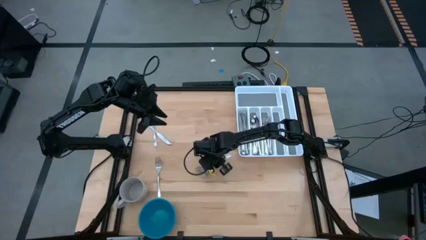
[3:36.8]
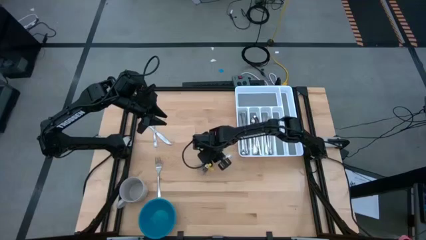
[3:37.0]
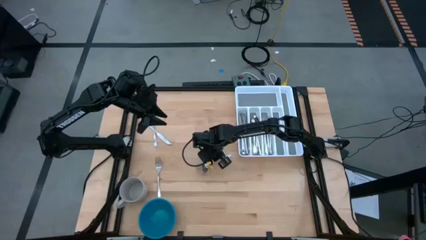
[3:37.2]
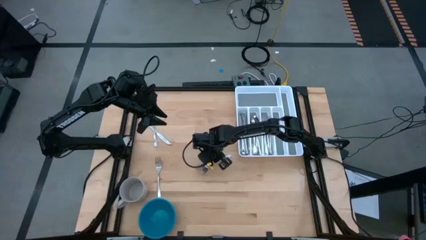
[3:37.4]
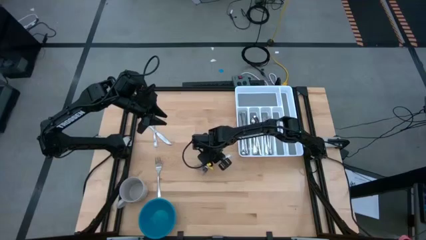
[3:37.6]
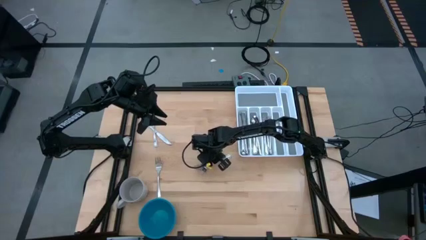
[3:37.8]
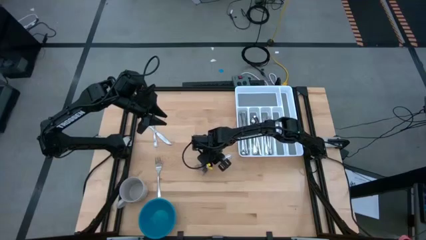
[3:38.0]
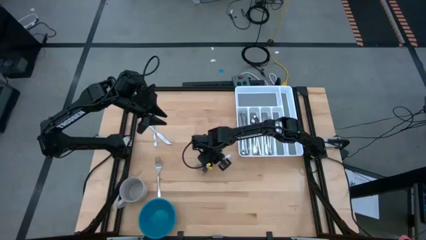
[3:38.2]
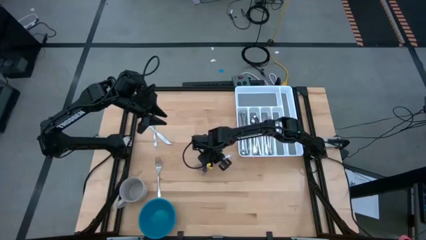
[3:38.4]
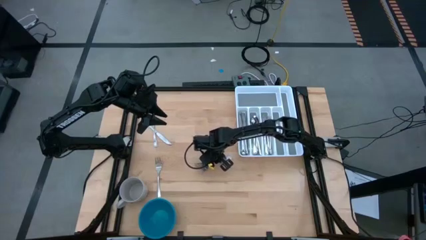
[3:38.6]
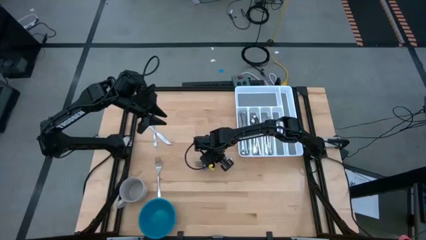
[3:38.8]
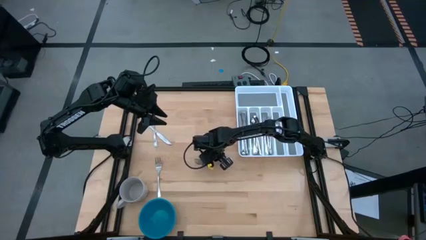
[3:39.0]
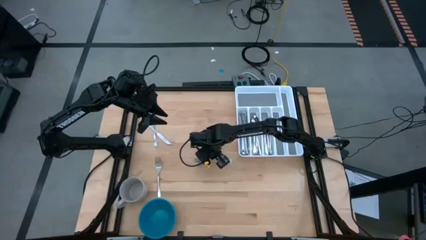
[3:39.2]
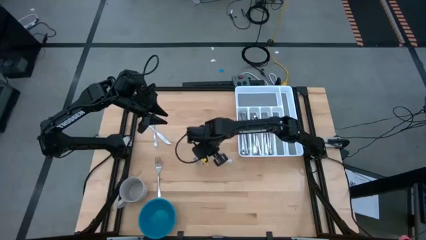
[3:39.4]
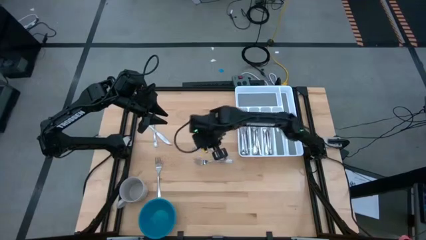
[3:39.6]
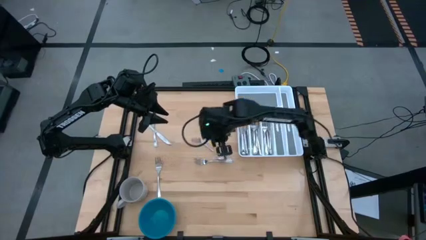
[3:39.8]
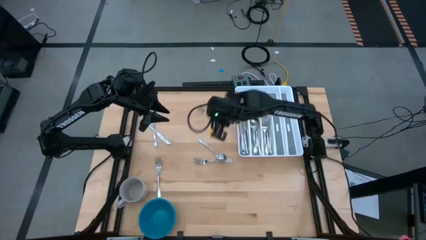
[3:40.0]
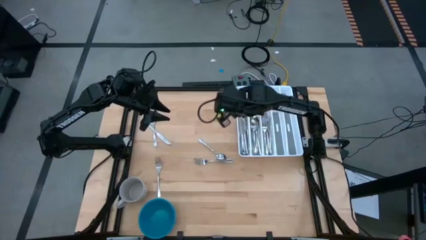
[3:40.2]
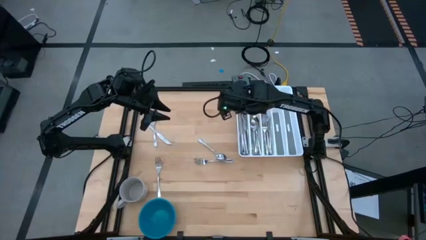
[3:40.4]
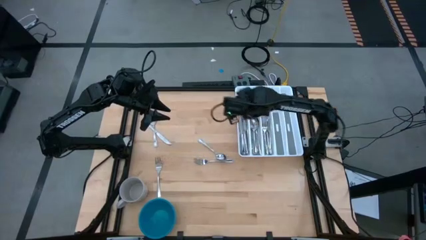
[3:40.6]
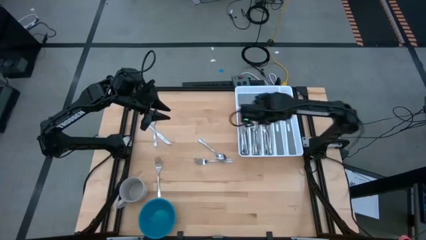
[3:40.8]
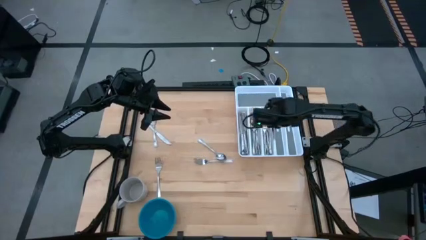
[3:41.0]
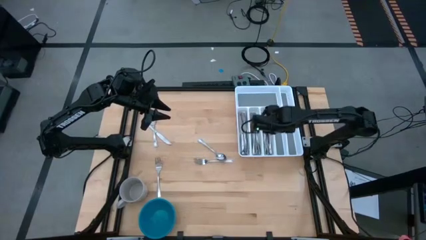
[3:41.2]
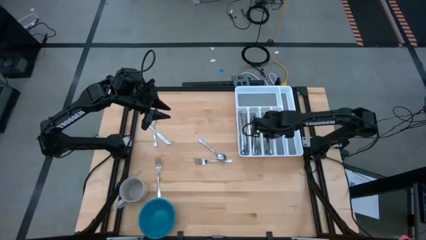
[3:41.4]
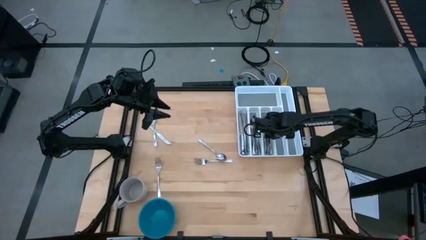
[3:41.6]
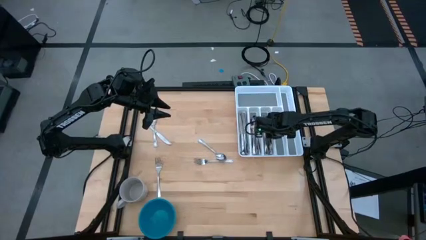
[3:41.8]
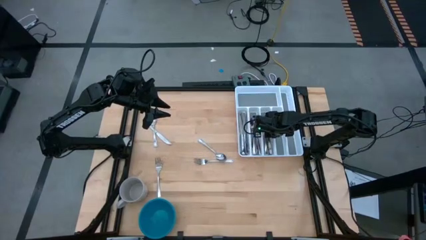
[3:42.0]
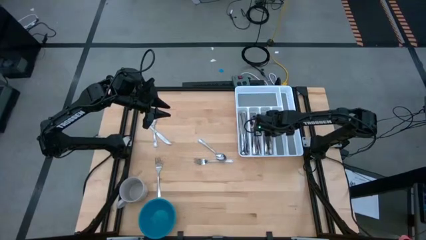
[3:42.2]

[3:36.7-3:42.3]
Task: Sort silverware
Put the fork into the silverware tray

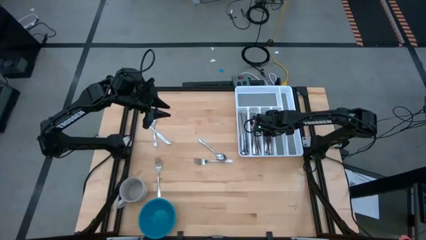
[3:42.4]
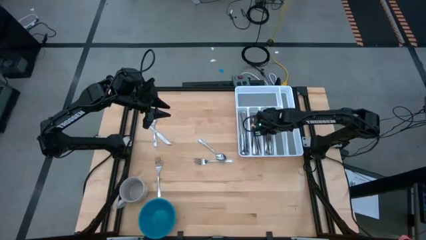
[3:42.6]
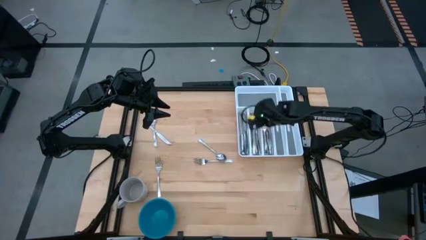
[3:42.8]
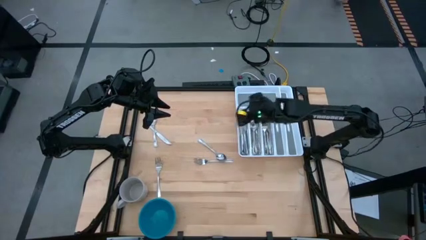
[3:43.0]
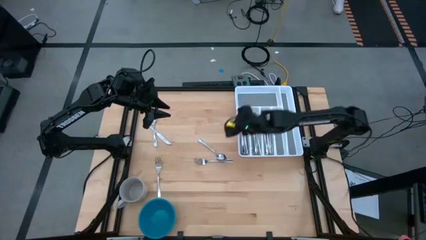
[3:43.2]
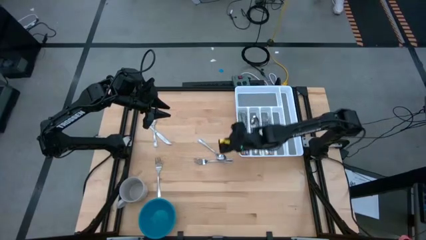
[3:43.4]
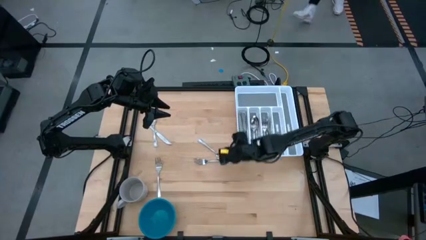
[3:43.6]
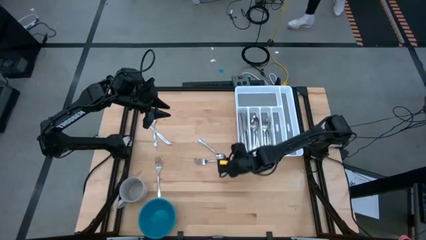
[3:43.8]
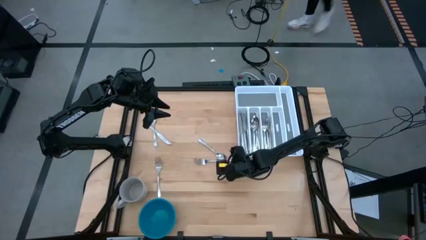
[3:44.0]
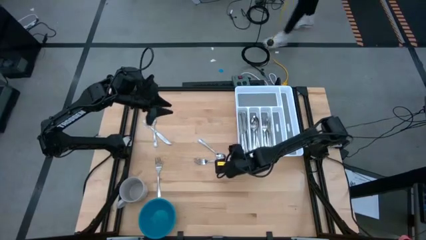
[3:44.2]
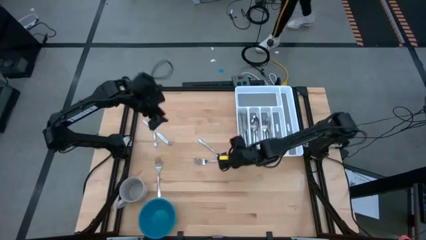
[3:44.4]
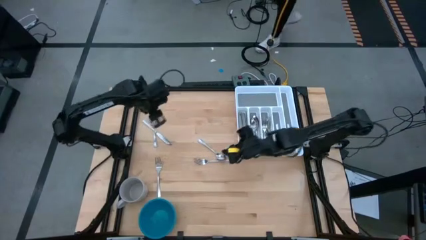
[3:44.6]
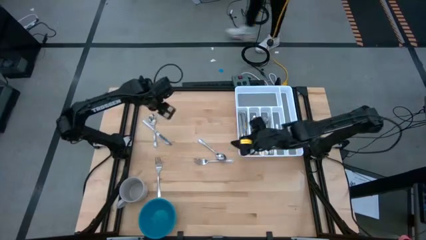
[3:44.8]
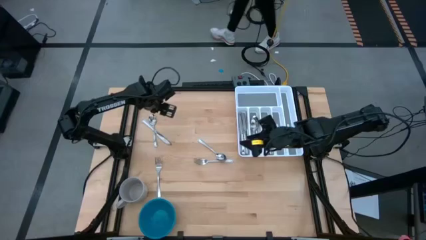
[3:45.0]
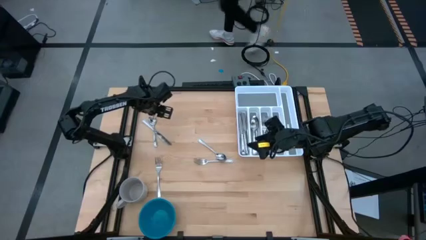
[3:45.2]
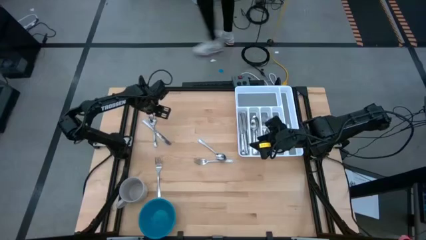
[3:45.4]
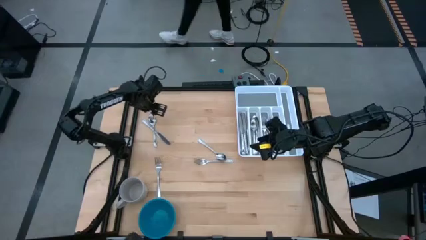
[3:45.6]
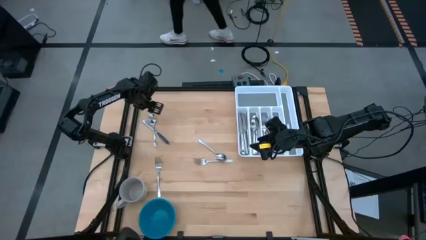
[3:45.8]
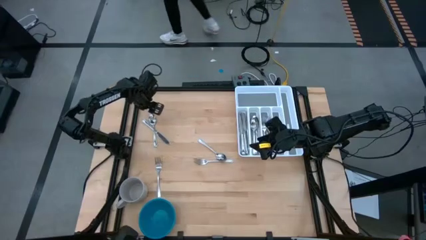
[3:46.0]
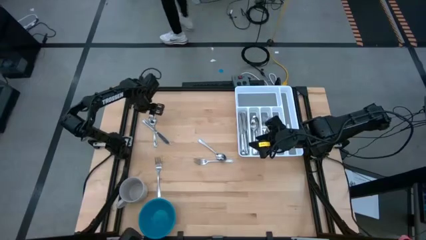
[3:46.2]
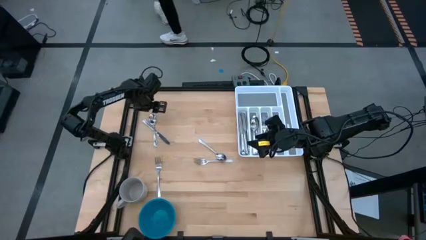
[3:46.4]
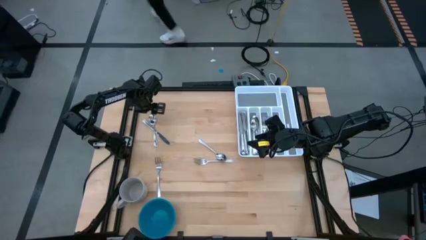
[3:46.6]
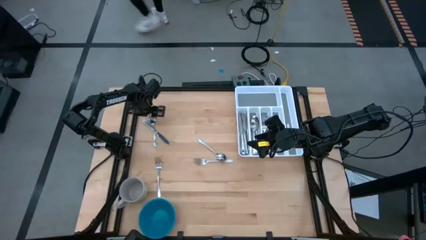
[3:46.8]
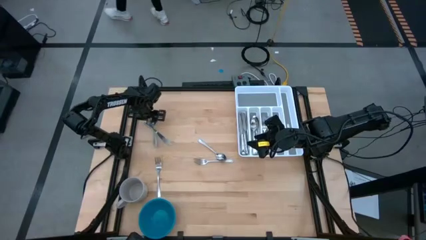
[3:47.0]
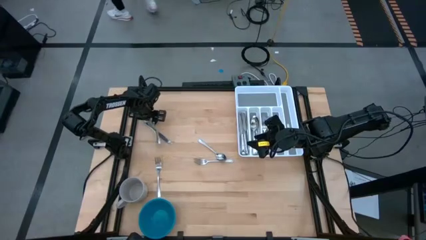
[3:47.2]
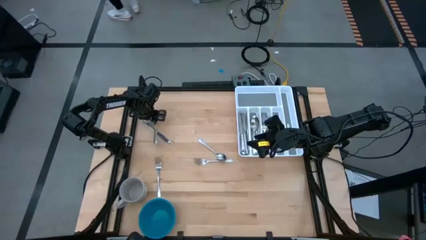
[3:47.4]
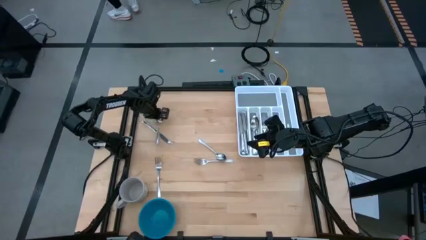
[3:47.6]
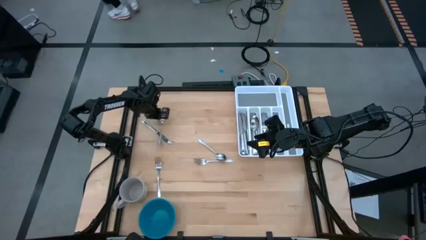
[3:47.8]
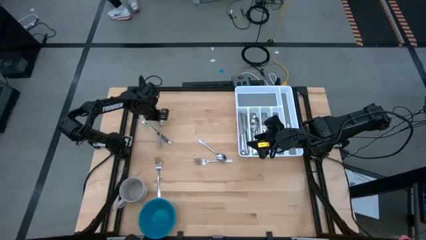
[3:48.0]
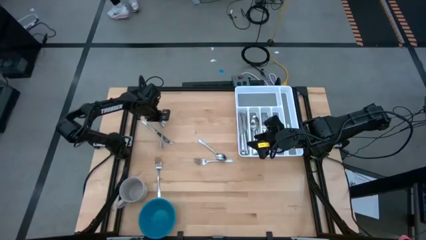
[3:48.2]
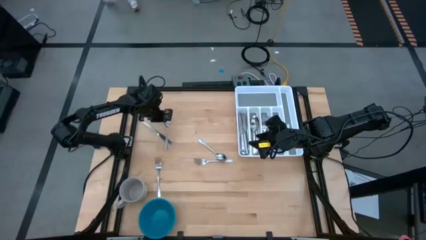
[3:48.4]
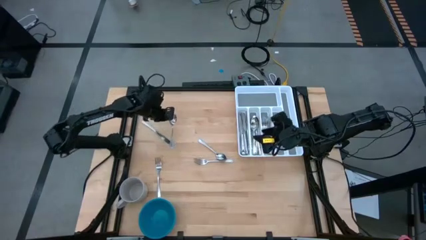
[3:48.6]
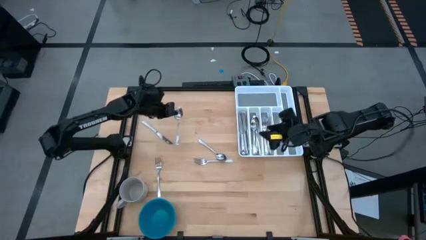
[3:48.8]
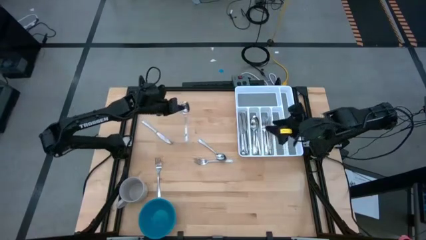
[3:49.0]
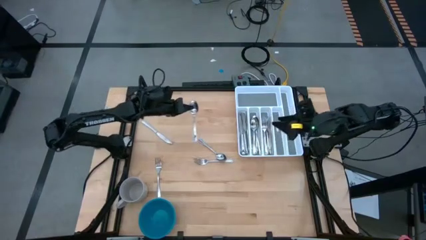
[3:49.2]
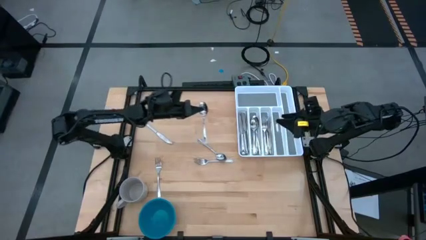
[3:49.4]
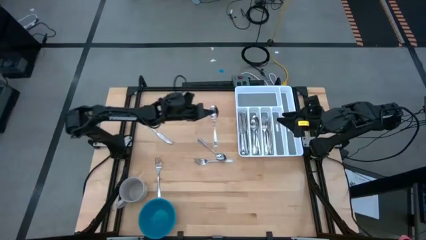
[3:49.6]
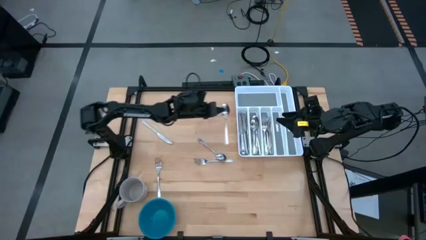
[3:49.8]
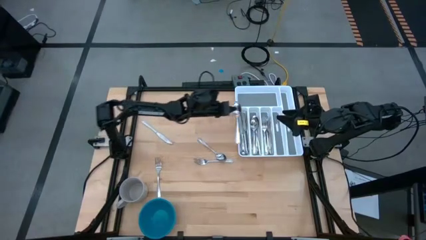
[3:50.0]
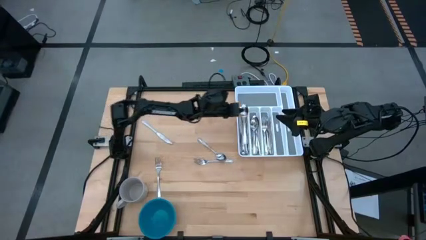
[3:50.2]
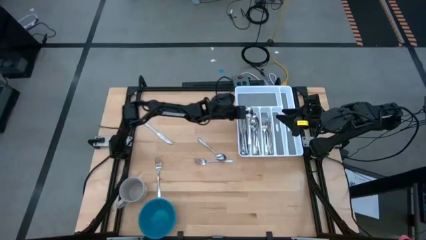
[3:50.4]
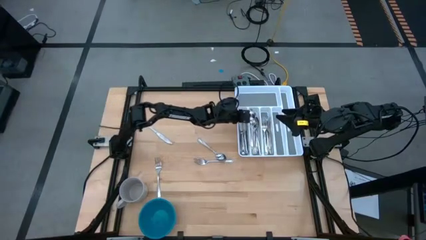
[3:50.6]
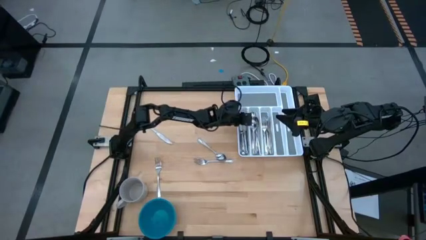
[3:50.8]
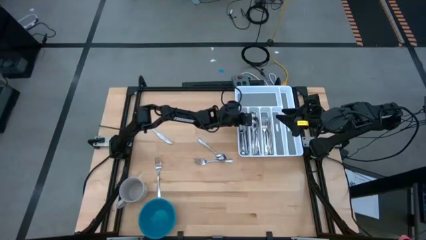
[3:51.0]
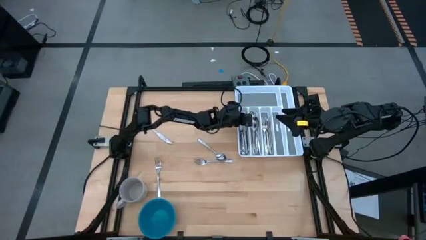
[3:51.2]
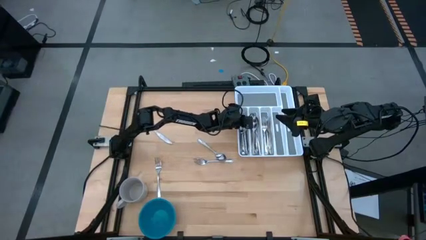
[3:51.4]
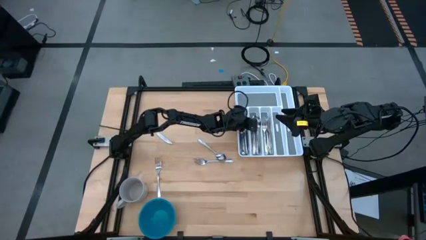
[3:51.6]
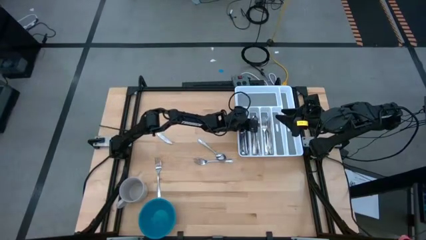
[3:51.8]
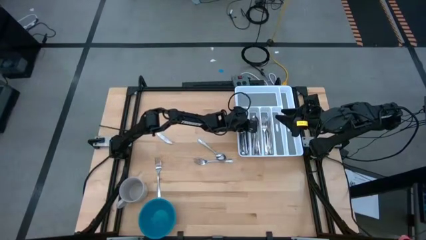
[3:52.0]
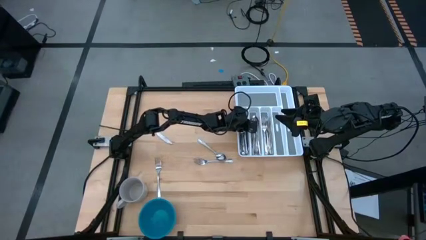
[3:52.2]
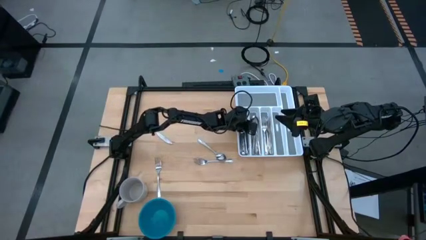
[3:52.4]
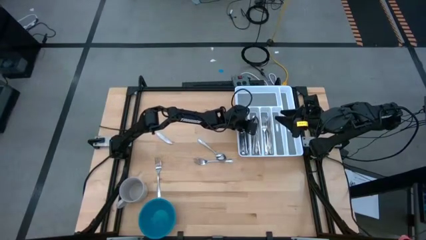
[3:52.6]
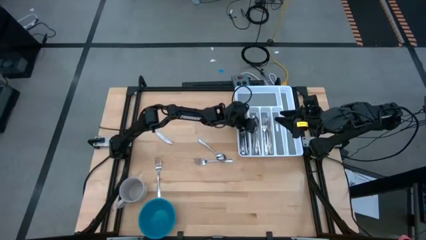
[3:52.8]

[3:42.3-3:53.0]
Put the spoon into the silverware tray
